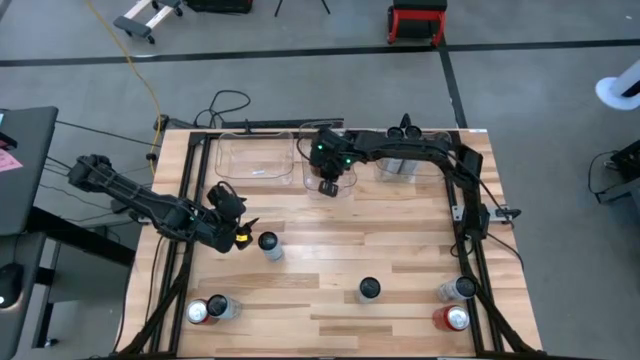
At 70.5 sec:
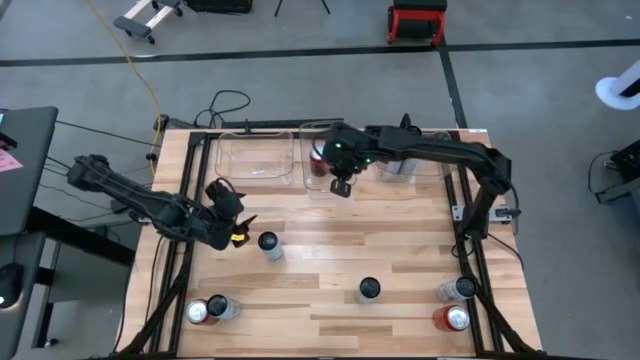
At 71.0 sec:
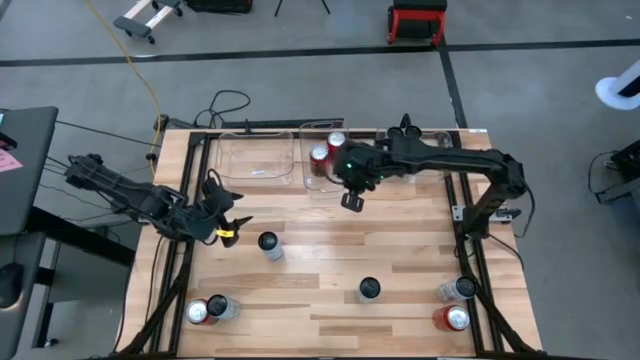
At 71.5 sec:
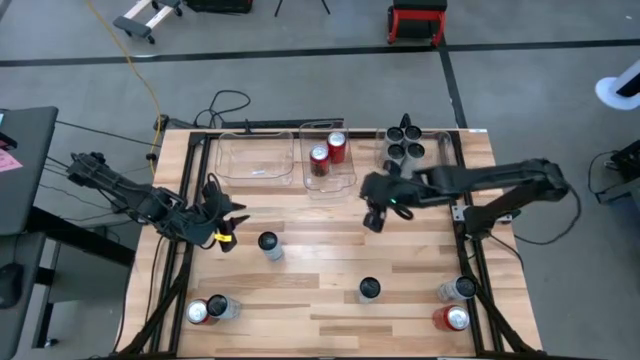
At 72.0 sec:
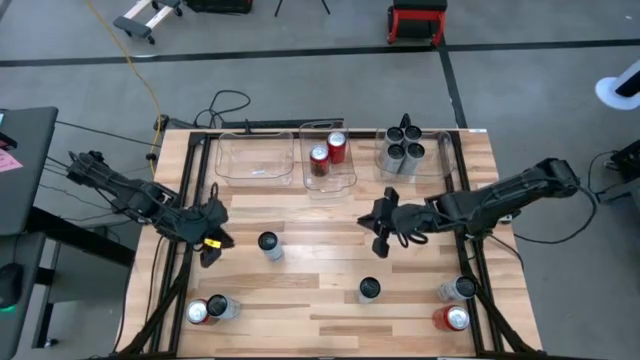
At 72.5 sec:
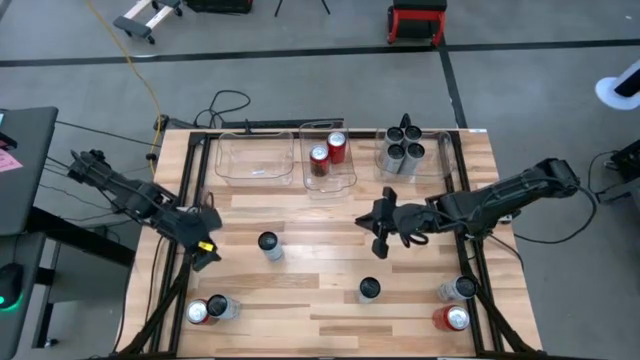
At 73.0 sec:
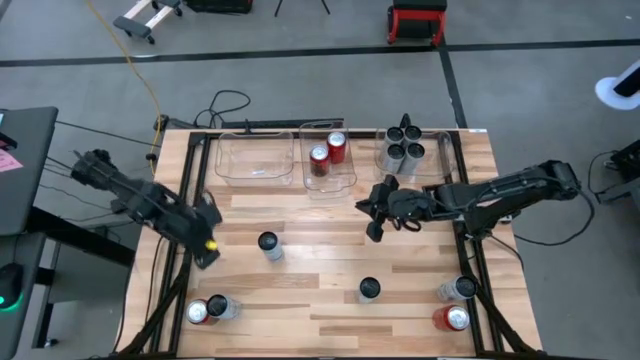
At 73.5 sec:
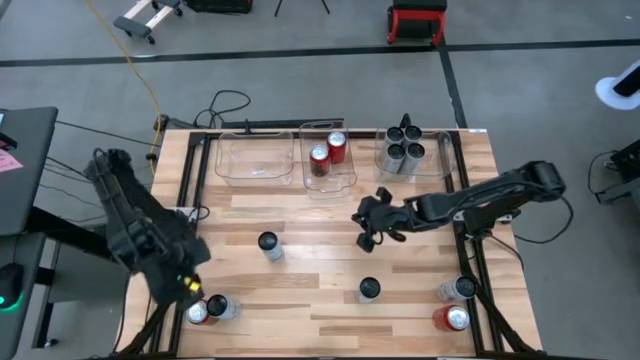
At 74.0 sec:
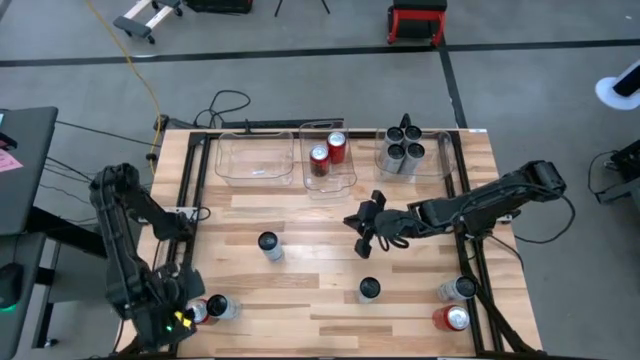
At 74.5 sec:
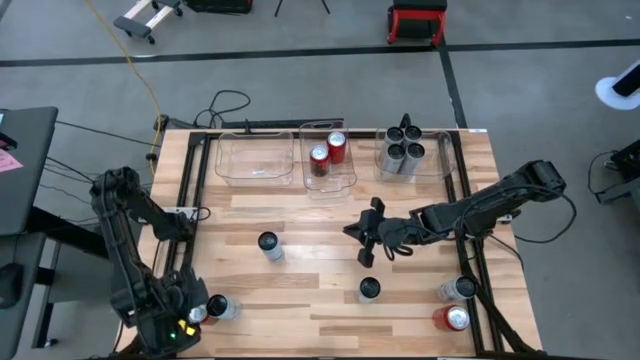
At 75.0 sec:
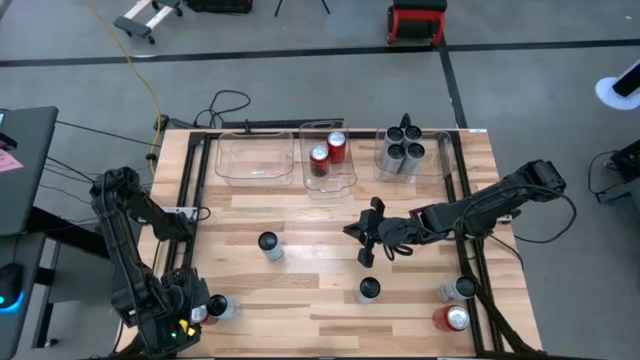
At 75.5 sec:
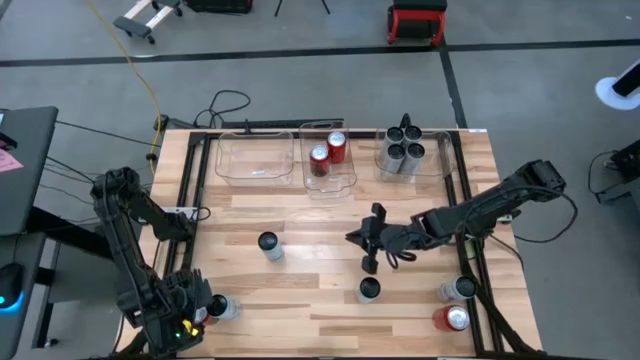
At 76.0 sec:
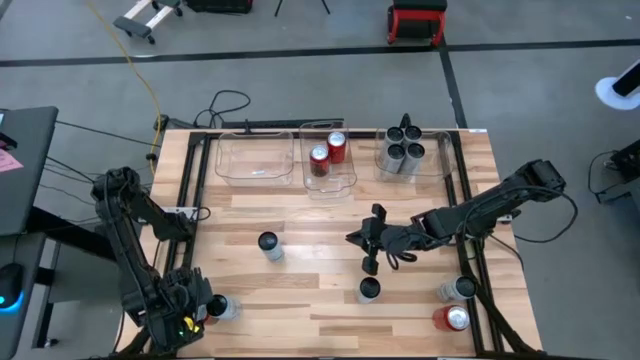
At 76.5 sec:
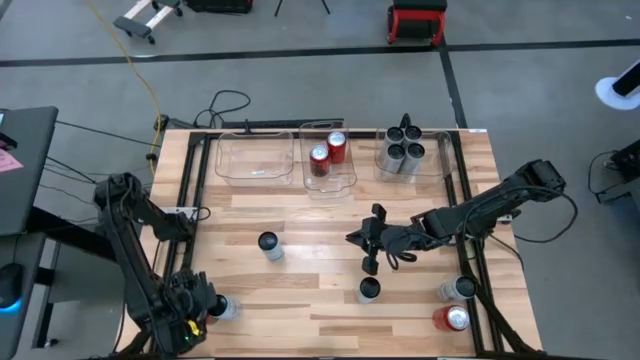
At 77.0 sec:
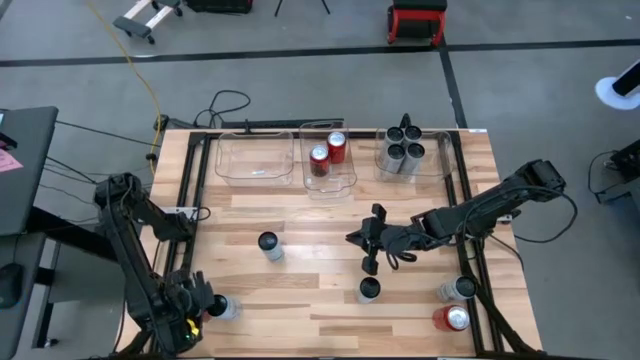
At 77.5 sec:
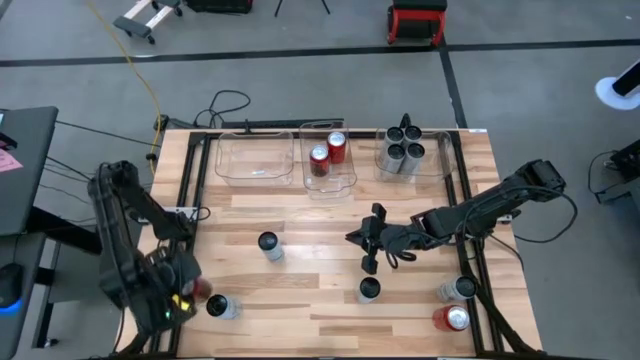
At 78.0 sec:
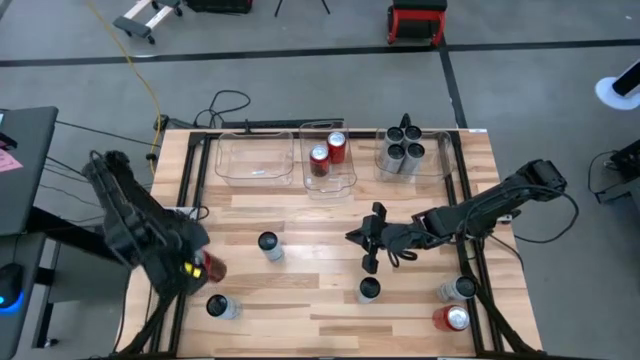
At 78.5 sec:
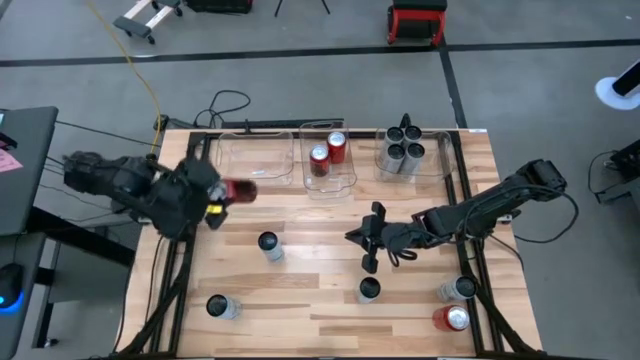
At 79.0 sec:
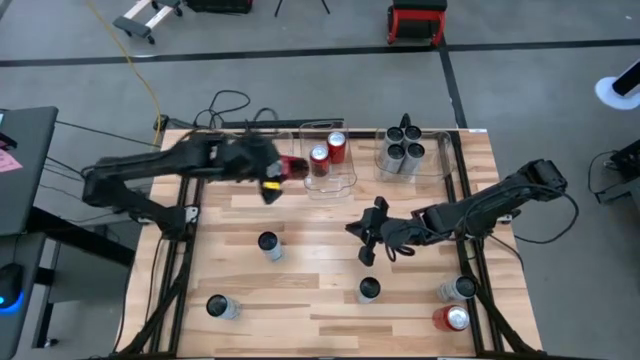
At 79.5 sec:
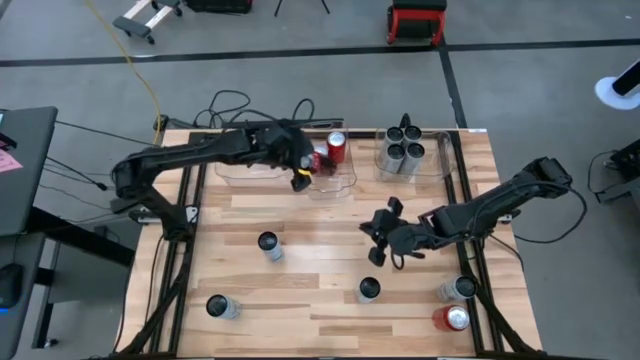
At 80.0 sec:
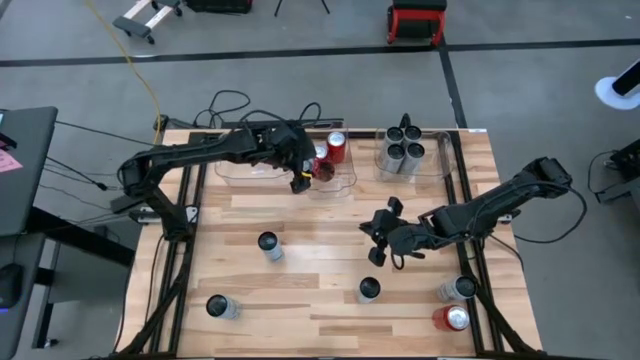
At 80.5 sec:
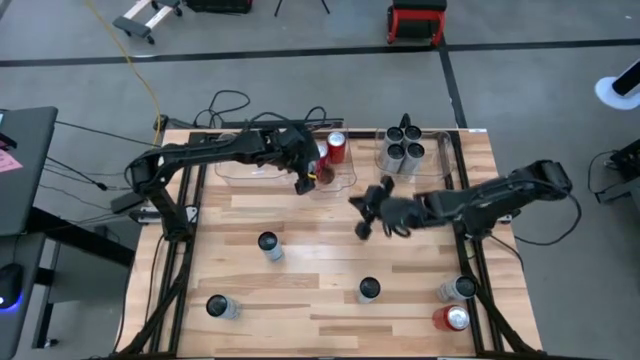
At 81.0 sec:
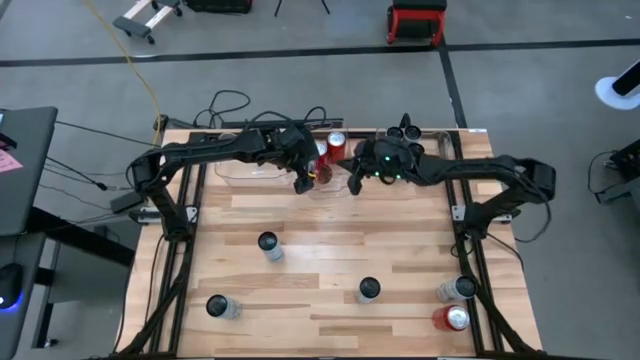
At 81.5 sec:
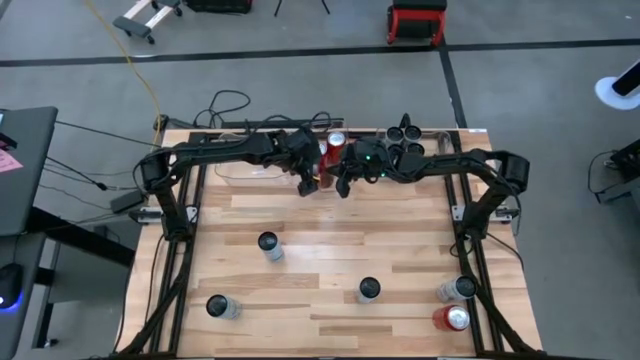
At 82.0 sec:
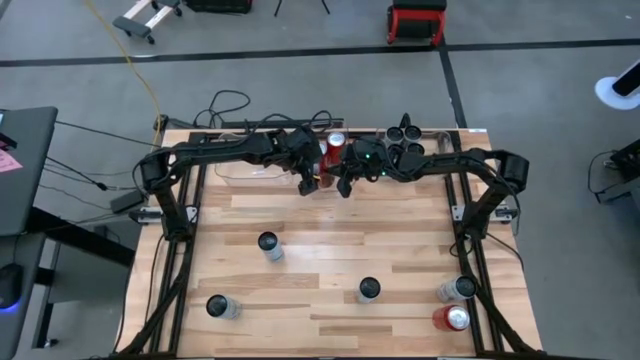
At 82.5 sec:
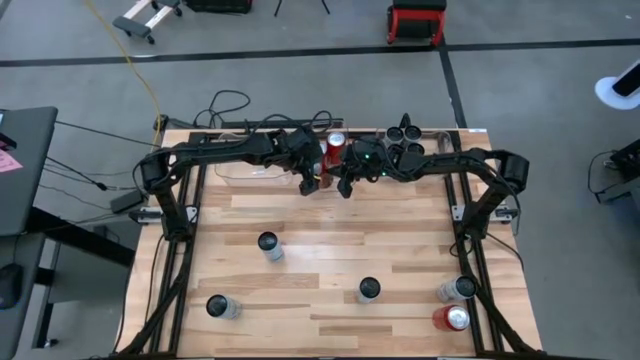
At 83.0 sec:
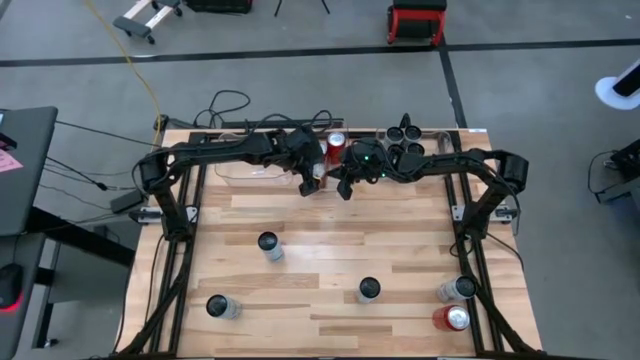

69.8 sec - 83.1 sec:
Task: Sort soda cans
Put the red-black soda can into the middle transparent bin
